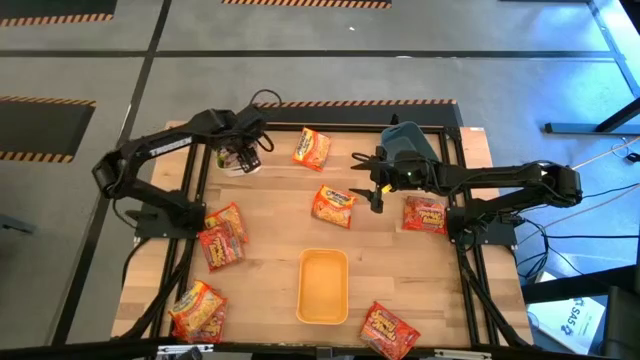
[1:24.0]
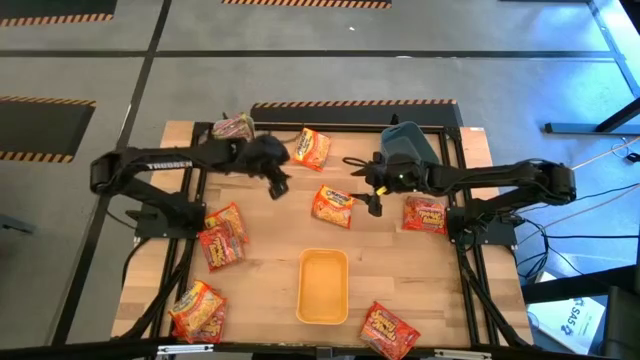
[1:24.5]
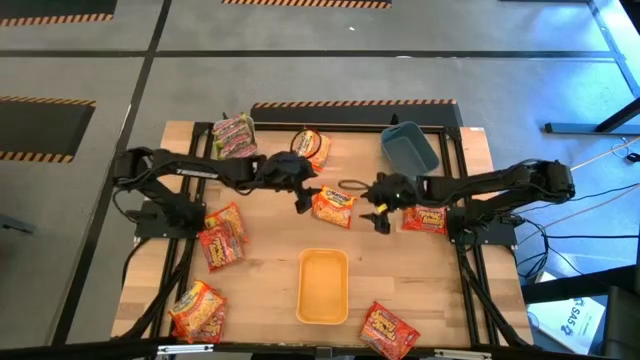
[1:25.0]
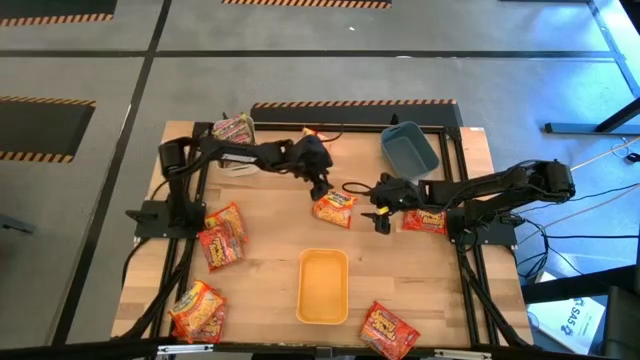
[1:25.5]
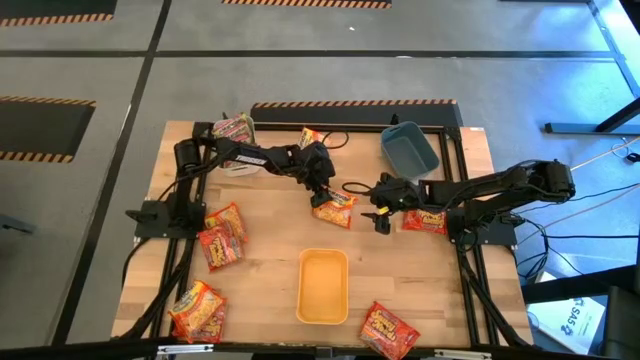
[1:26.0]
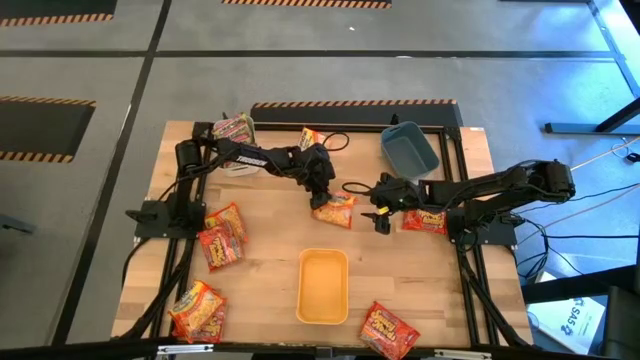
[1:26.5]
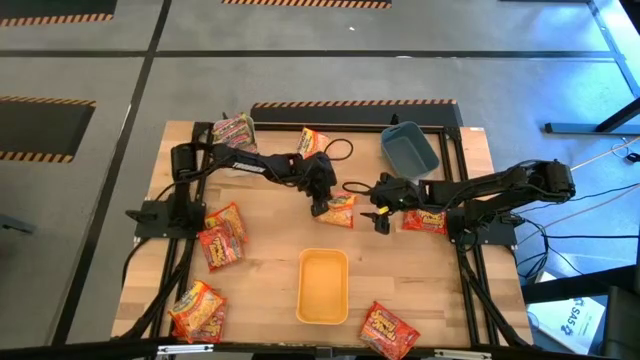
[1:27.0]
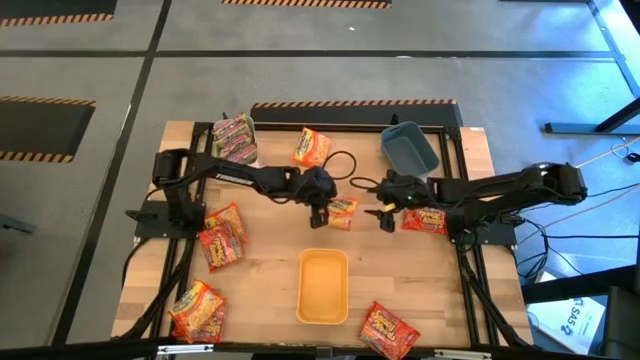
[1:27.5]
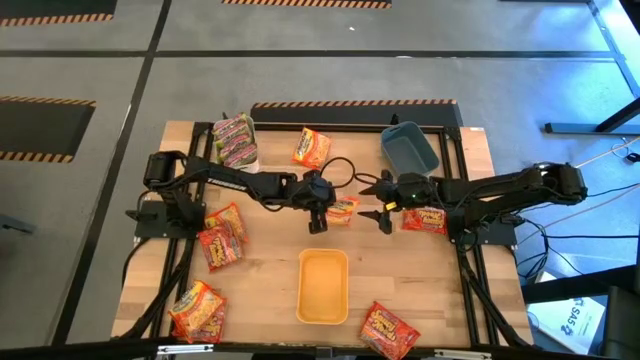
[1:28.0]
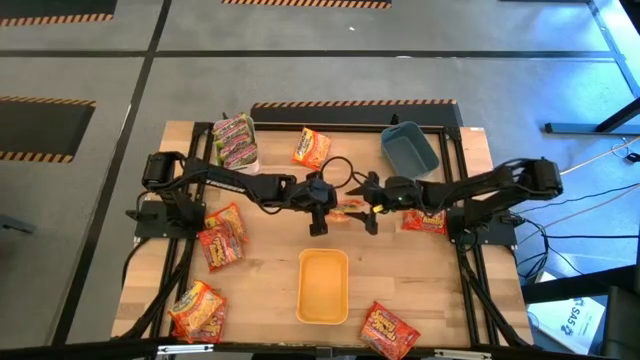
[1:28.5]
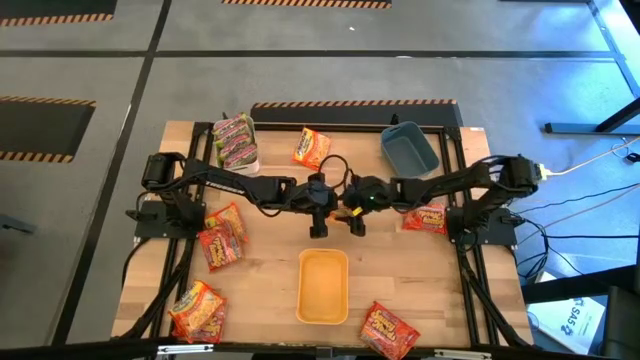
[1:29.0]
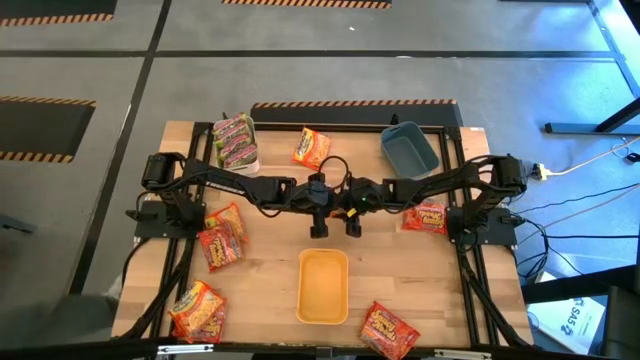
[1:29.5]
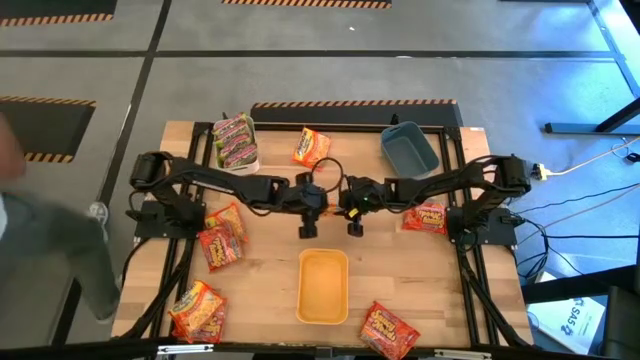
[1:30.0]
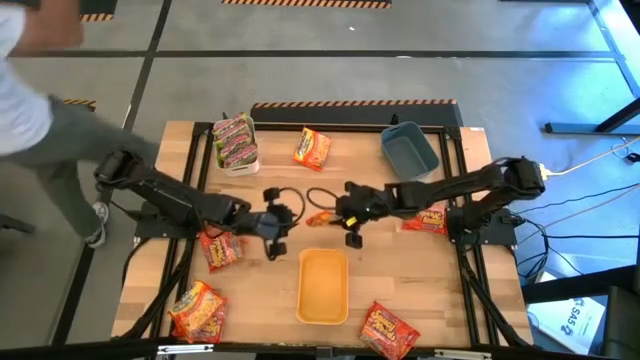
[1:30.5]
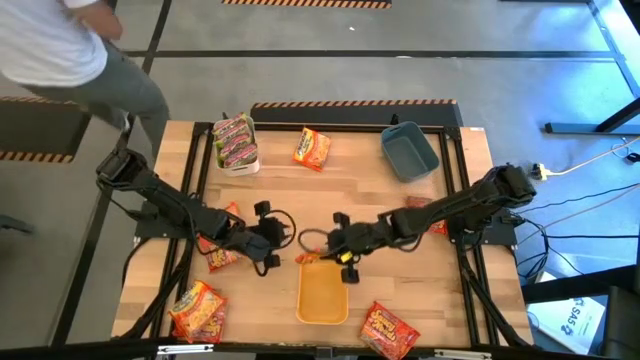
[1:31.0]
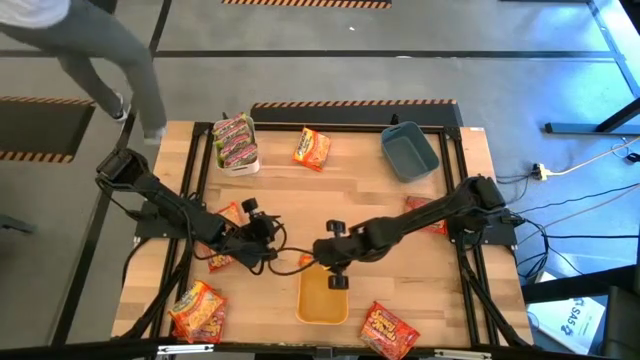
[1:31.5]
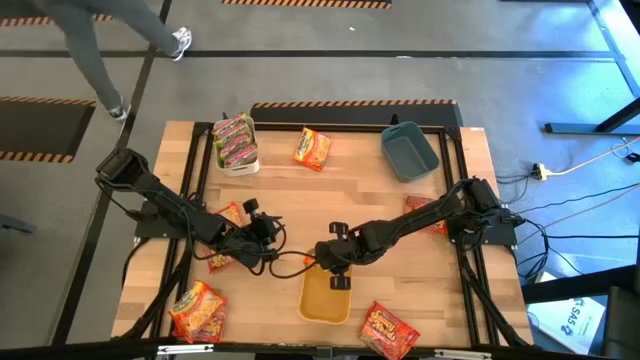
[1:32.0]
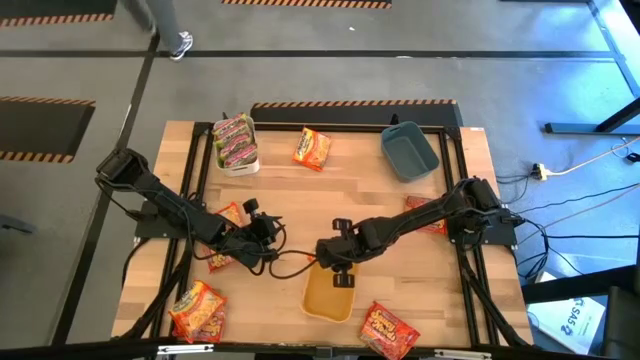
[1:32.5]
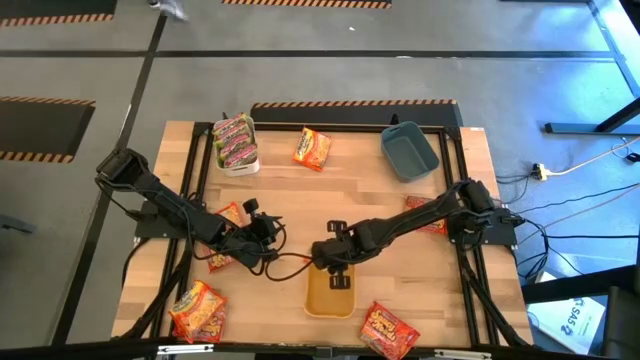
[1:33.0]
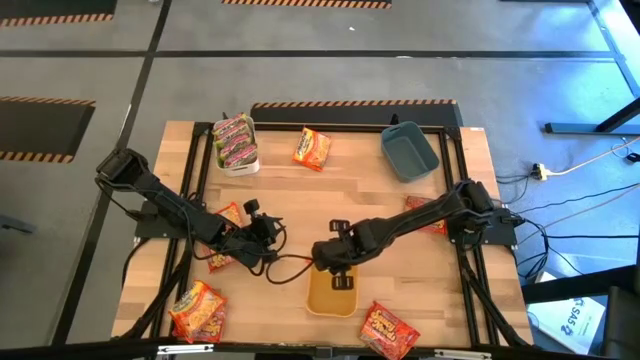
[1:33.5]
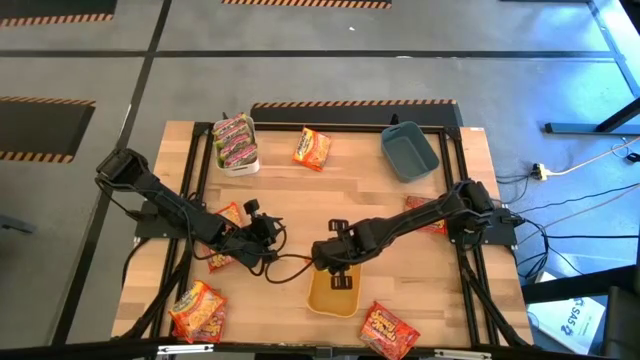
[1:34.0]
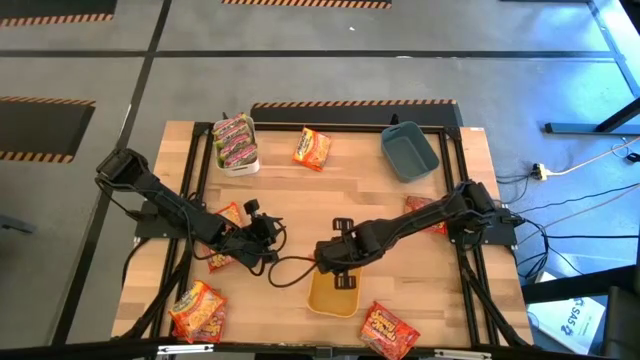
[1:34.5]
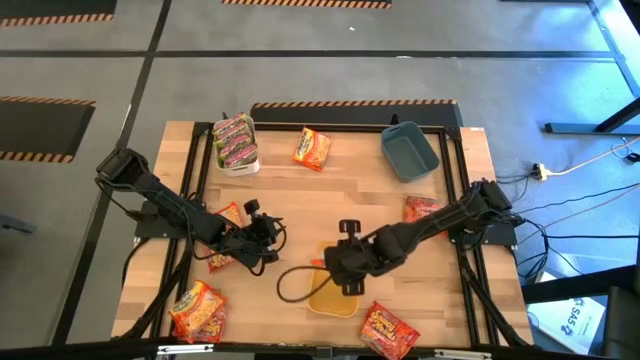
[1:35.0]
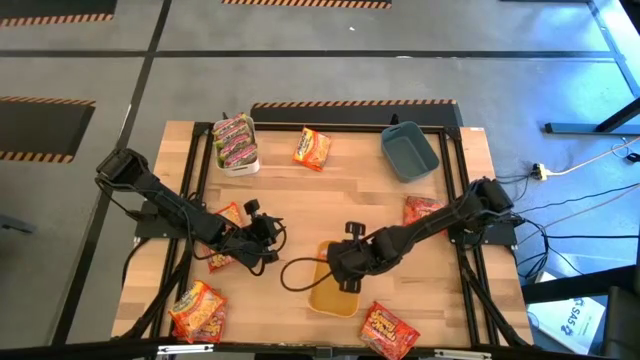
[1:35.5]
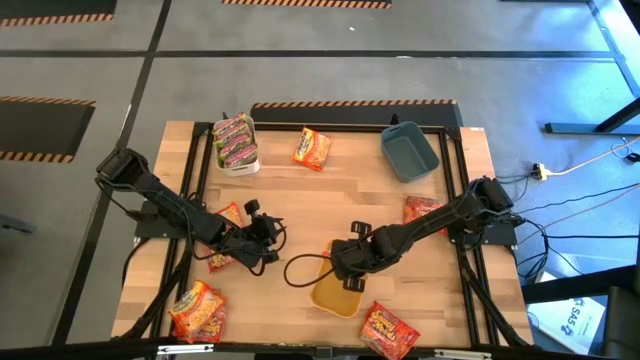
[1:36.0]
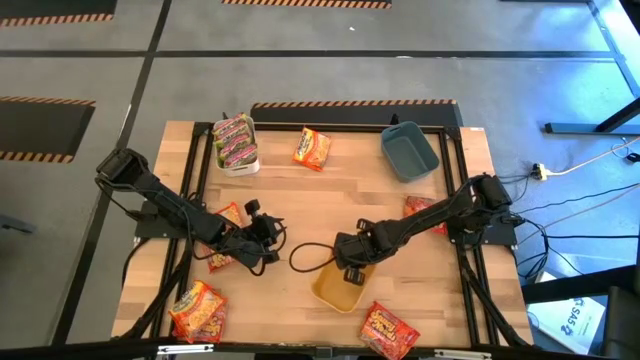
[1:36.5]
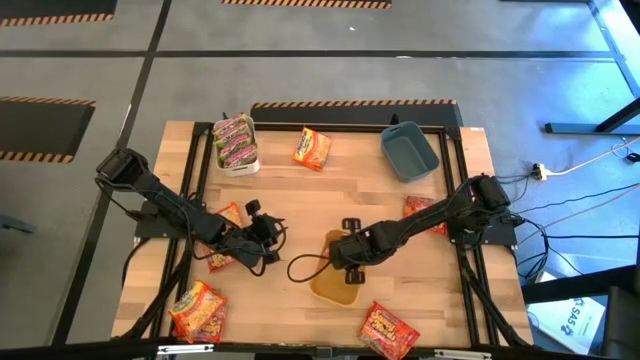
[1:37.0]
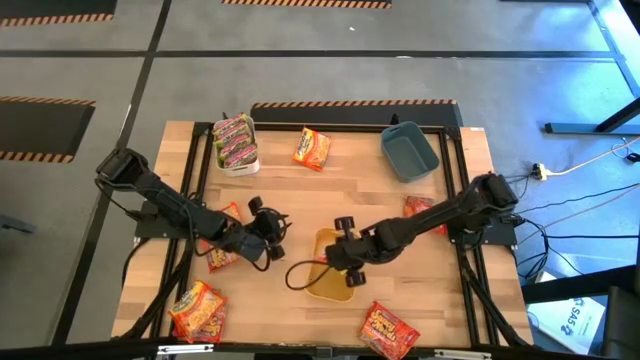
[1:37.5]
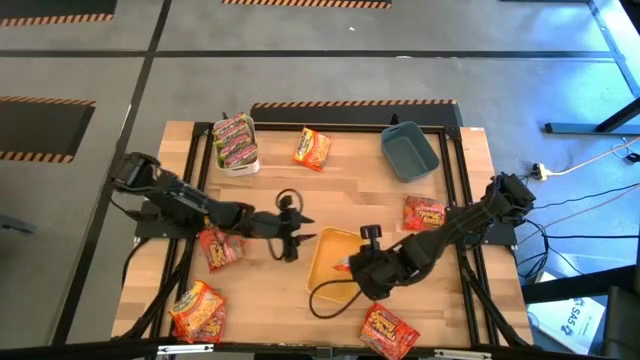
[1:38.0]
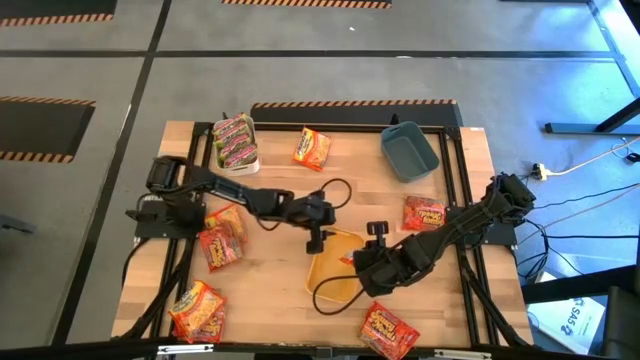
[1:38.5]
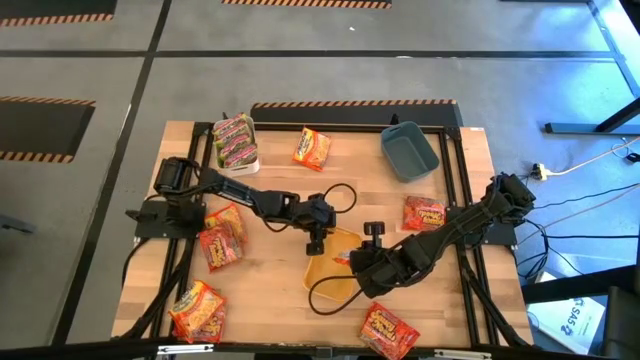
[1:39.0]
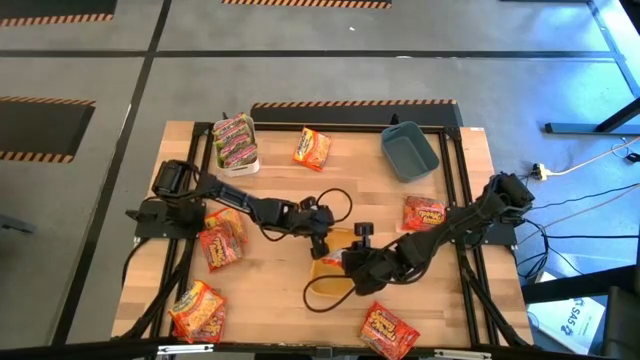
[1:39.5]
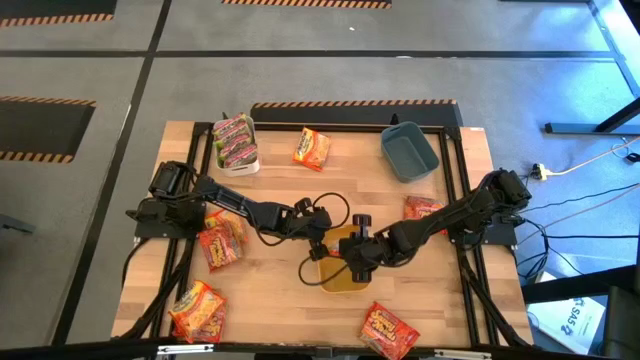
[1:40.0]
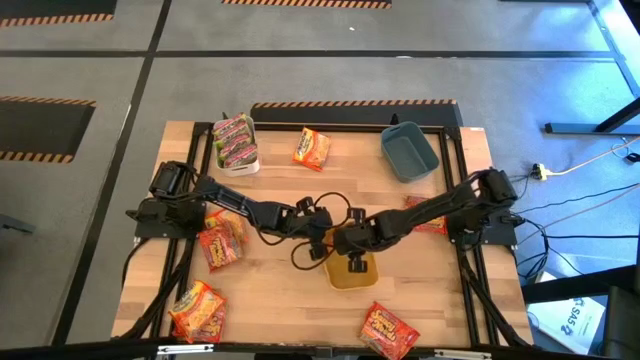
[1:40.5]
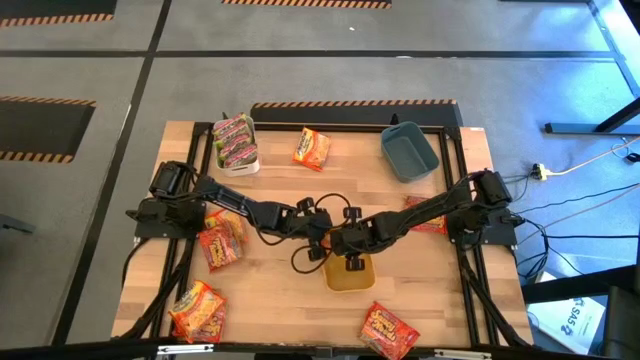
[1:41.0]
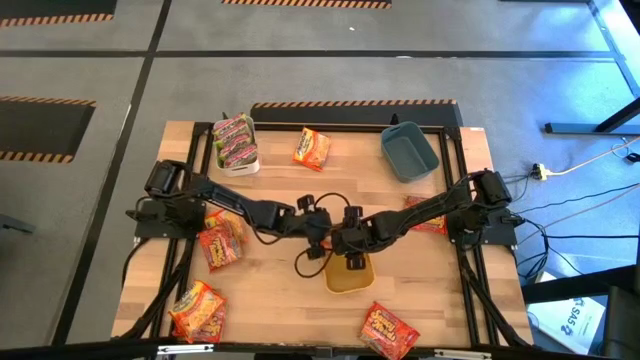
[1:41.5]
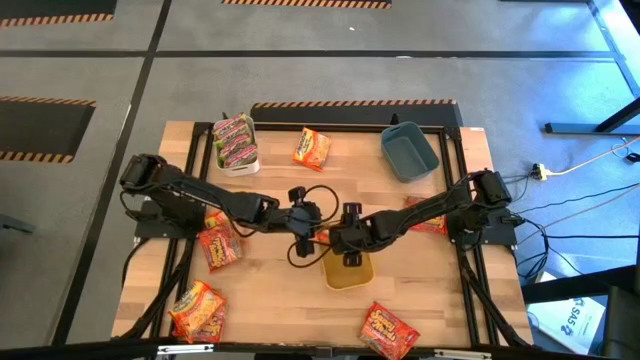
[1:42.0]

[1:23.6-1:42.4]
Task: Sort Maruchan noodles
Put the middle right orange noodle pack into the yellow bin

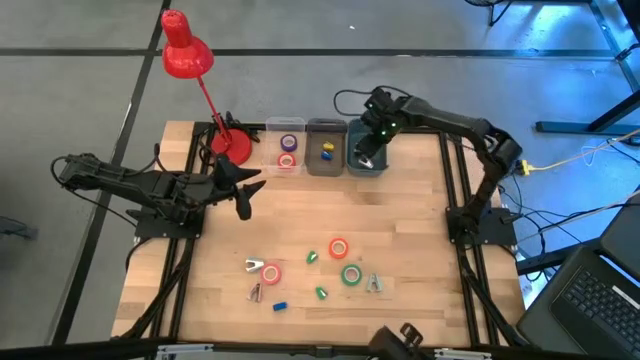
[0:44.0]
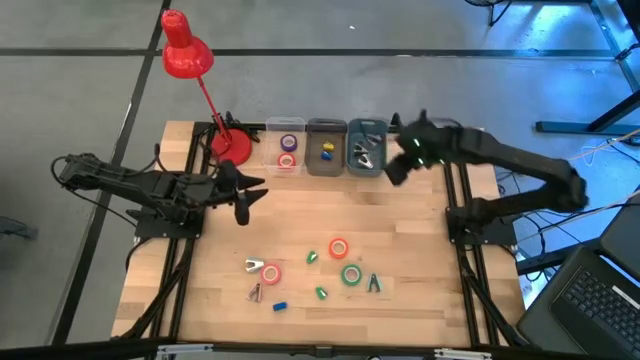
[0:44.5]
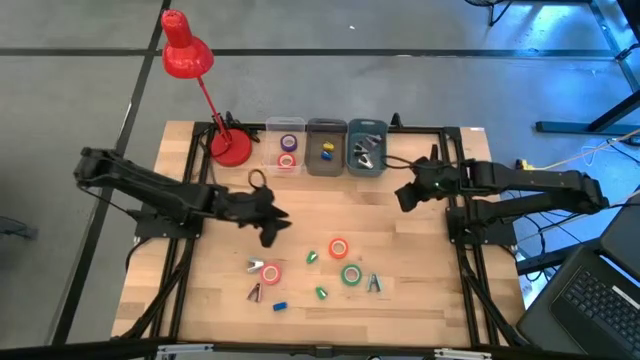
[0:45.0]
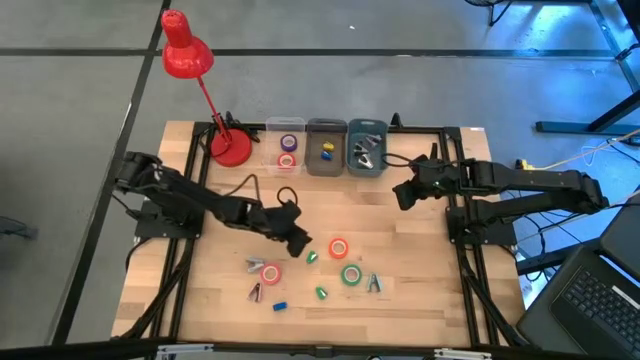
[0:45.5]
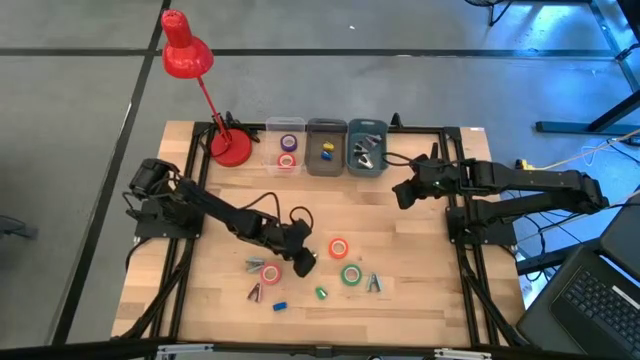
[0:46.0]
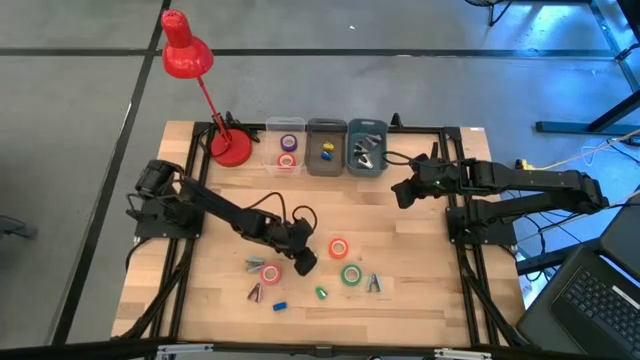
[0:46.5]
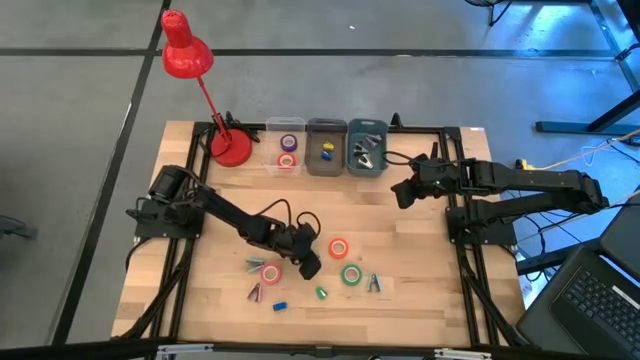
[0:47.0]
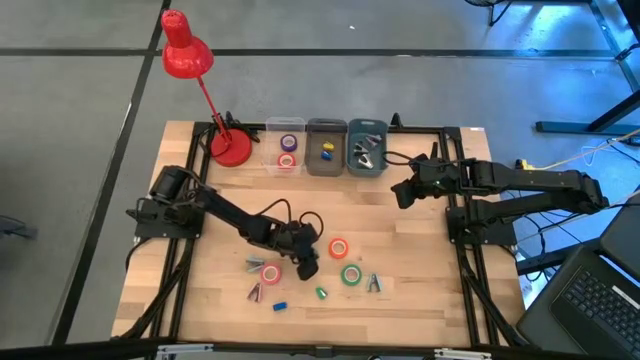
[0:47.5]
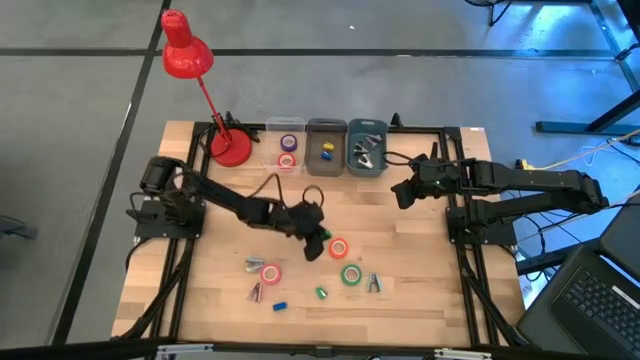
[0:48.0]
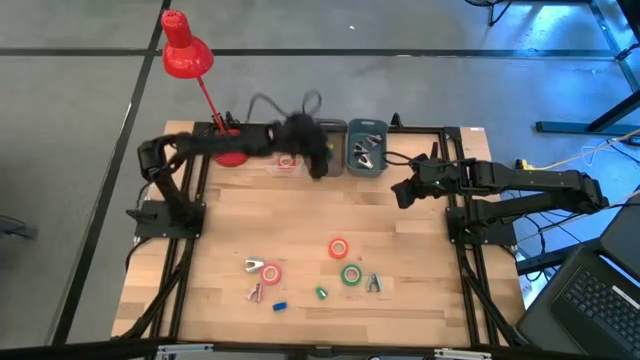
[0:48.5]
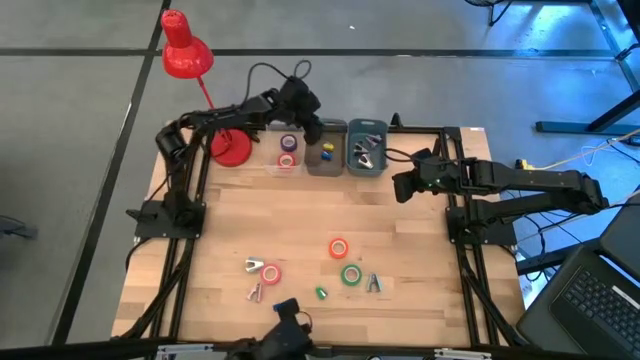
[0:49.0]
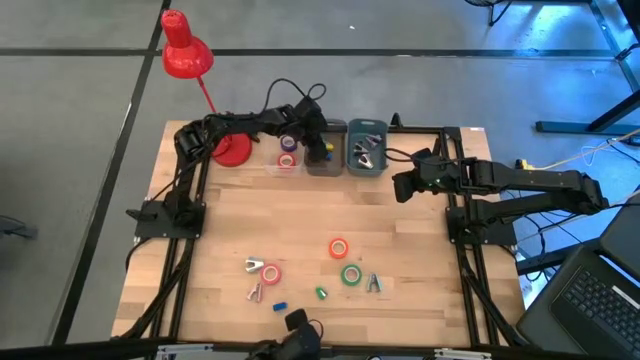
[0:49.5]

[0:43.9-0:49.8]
Task: Pick and place Stapler, Stapler remover, tape
Put the top green stapler into the black bin
